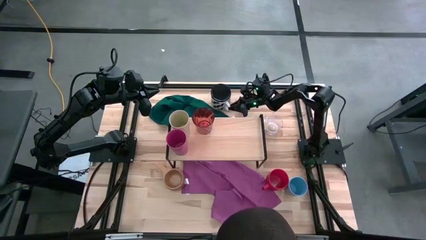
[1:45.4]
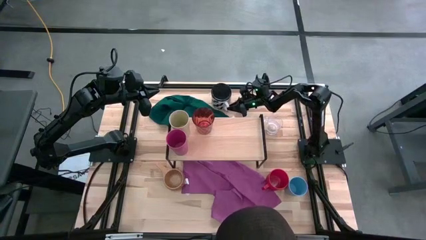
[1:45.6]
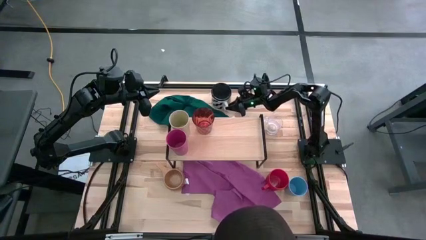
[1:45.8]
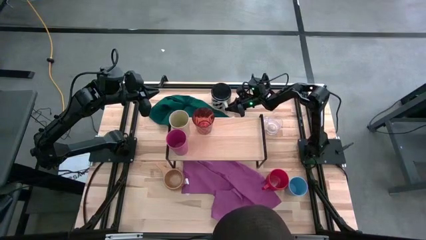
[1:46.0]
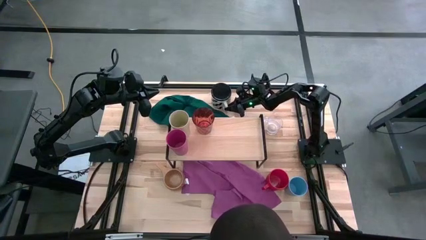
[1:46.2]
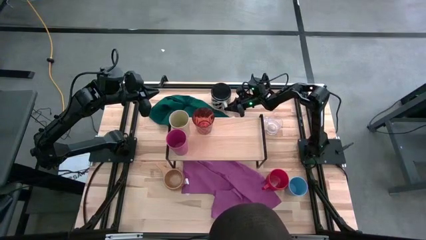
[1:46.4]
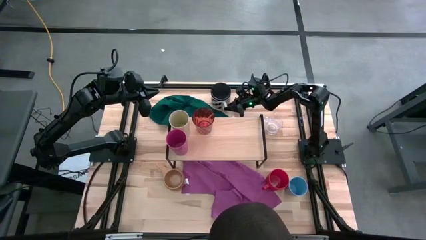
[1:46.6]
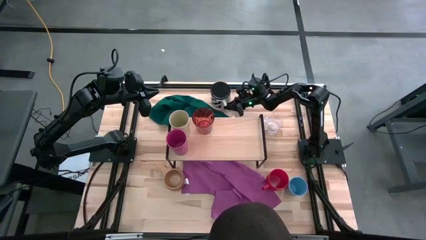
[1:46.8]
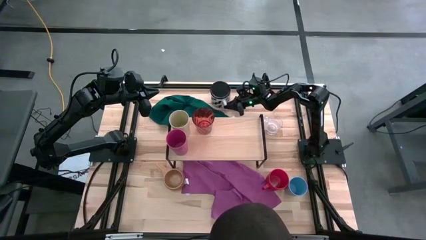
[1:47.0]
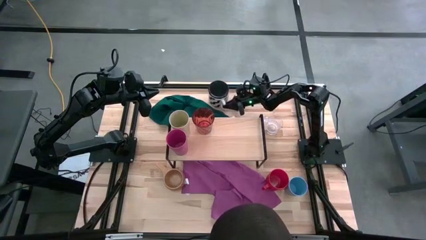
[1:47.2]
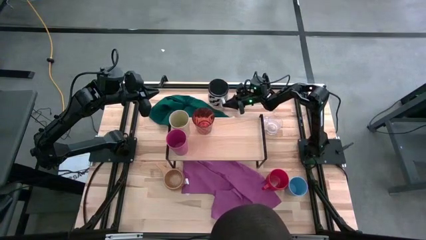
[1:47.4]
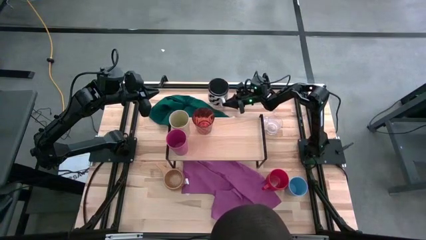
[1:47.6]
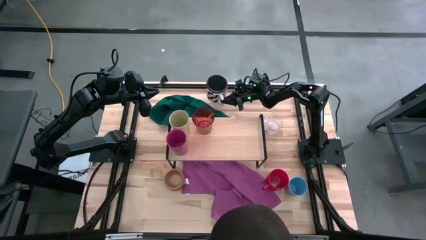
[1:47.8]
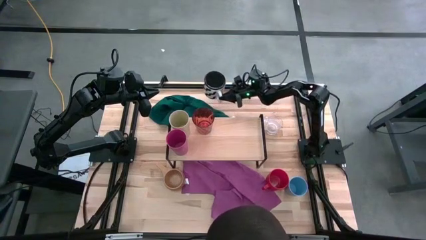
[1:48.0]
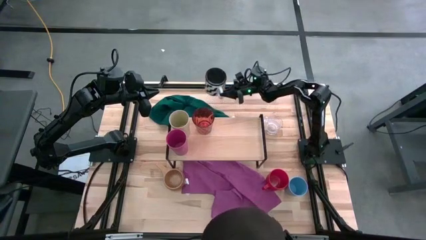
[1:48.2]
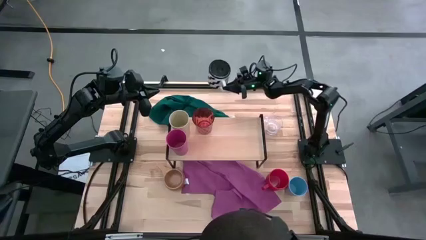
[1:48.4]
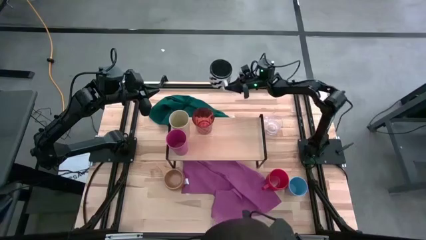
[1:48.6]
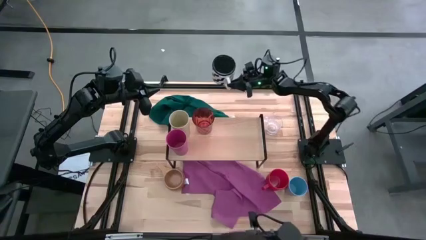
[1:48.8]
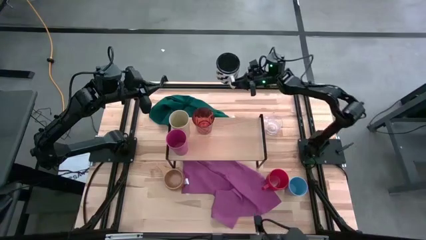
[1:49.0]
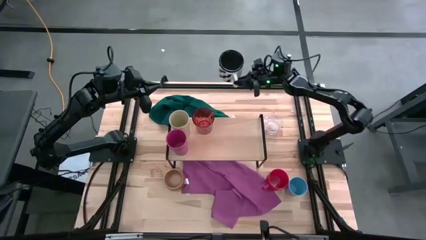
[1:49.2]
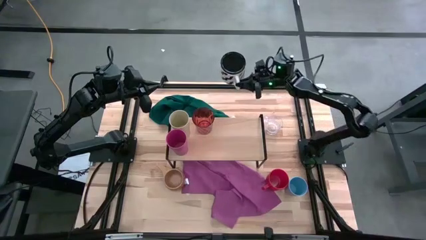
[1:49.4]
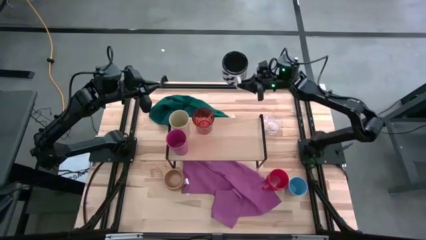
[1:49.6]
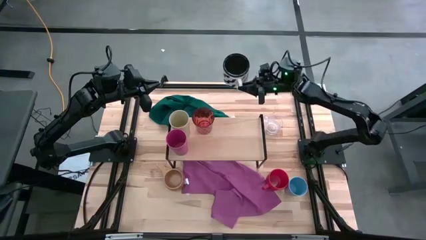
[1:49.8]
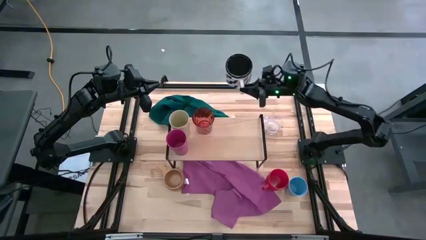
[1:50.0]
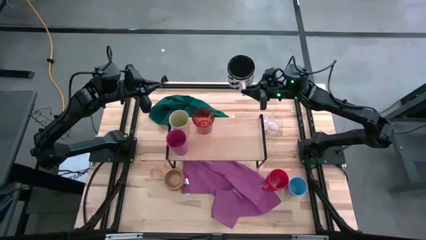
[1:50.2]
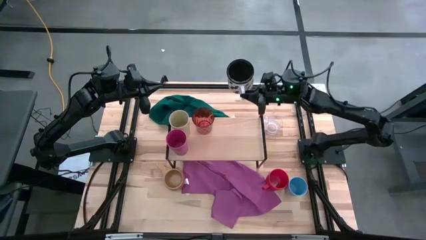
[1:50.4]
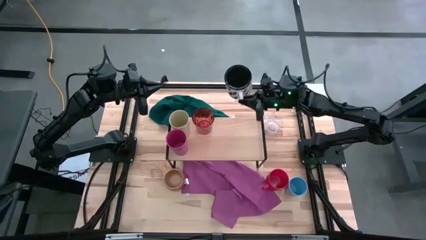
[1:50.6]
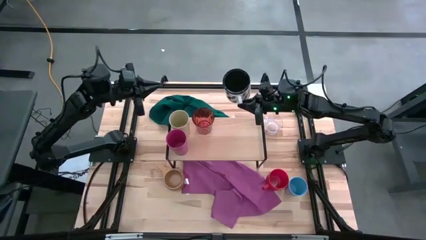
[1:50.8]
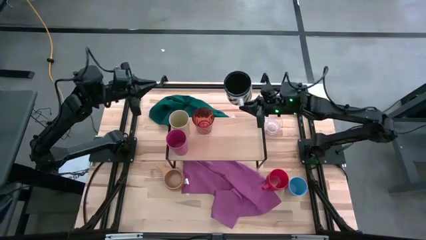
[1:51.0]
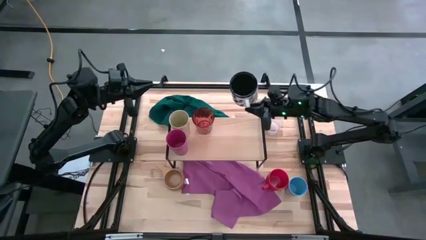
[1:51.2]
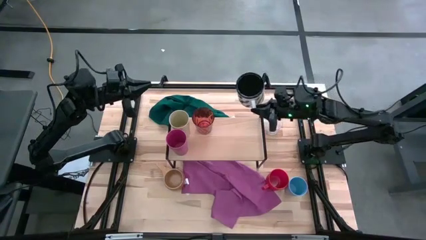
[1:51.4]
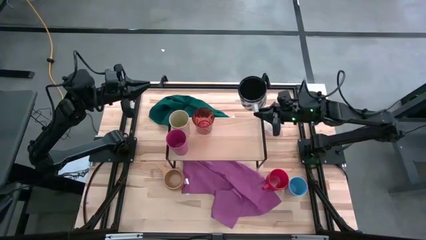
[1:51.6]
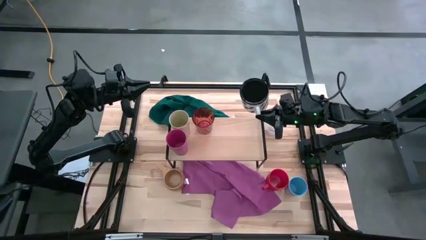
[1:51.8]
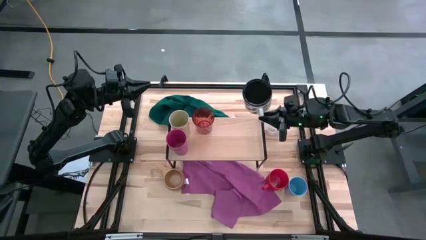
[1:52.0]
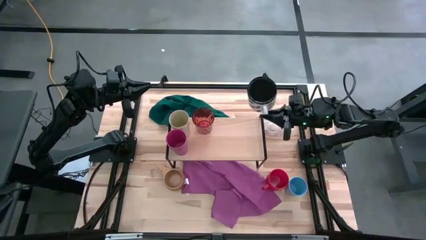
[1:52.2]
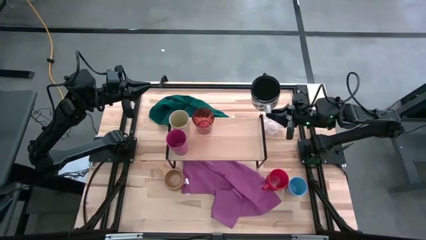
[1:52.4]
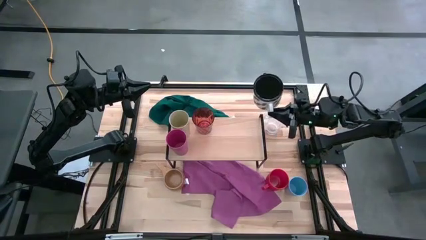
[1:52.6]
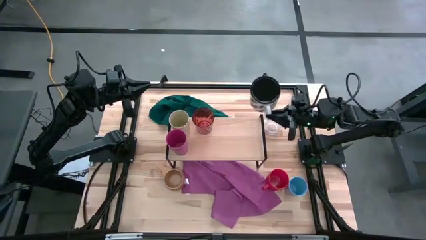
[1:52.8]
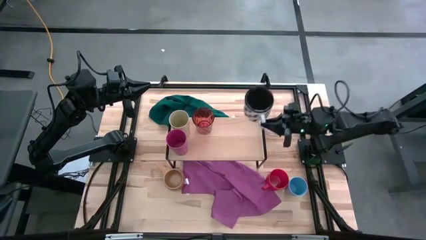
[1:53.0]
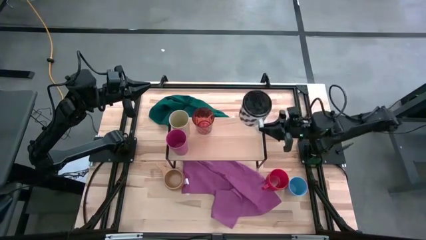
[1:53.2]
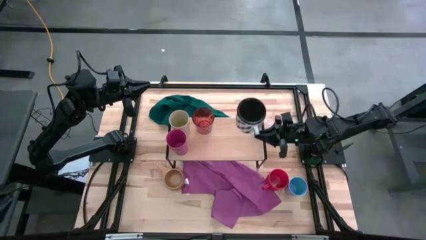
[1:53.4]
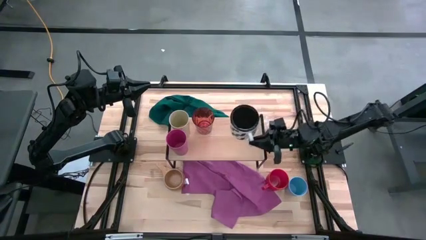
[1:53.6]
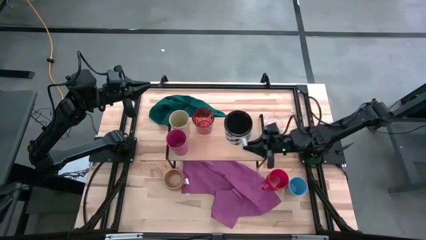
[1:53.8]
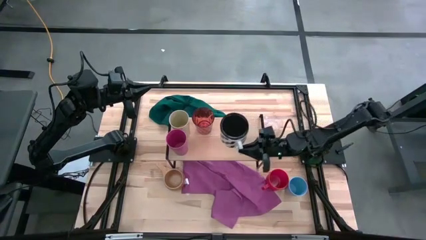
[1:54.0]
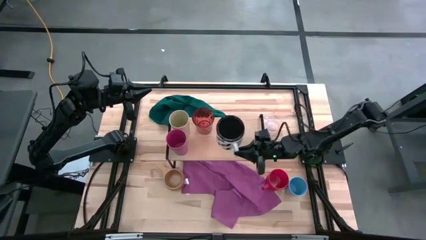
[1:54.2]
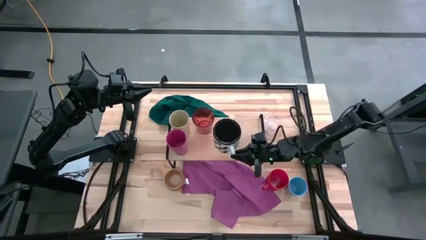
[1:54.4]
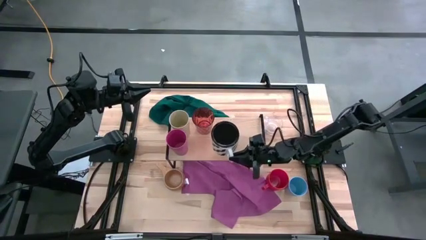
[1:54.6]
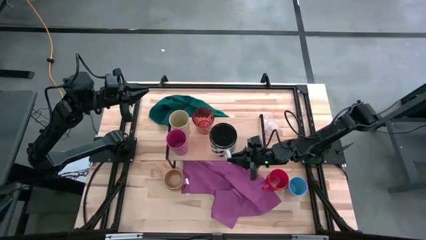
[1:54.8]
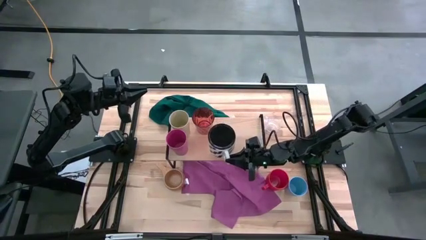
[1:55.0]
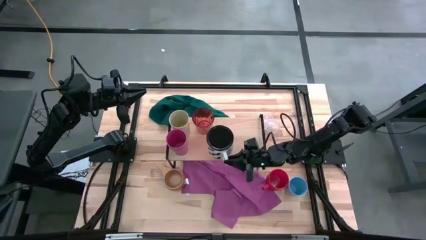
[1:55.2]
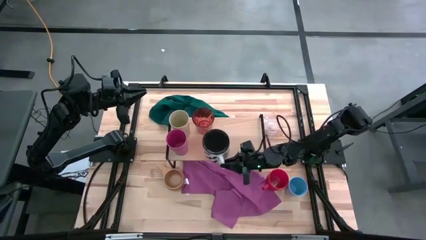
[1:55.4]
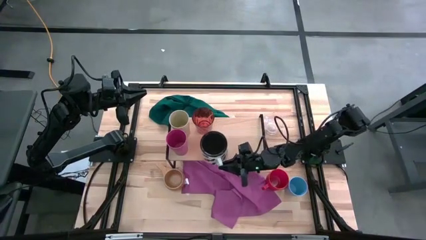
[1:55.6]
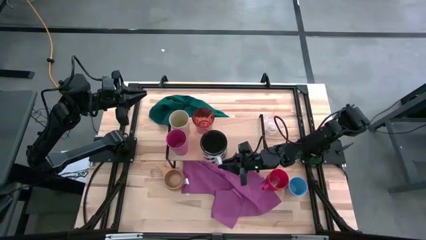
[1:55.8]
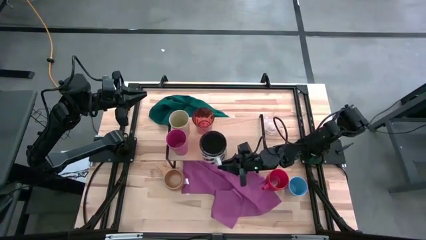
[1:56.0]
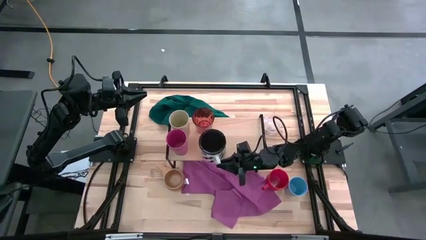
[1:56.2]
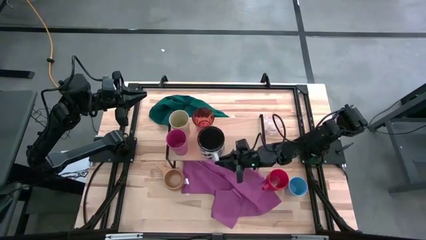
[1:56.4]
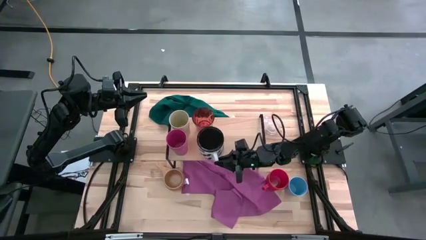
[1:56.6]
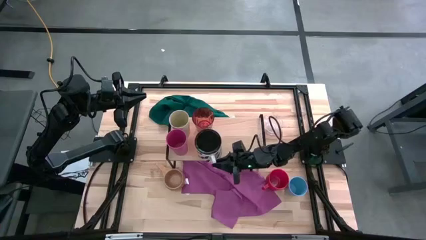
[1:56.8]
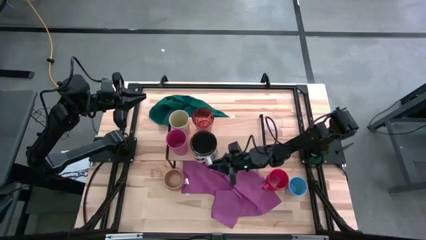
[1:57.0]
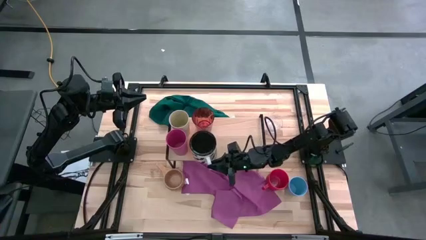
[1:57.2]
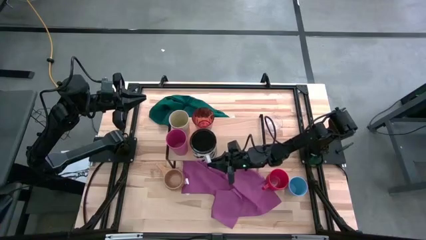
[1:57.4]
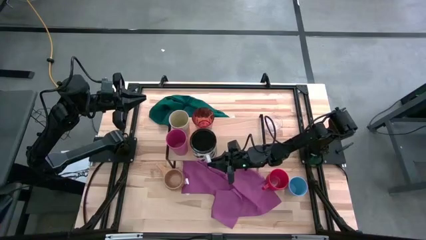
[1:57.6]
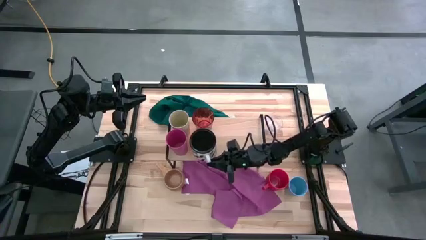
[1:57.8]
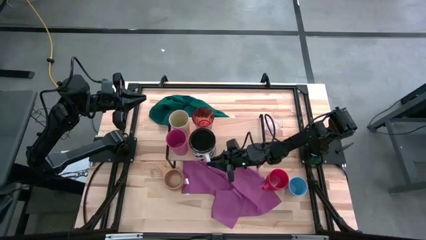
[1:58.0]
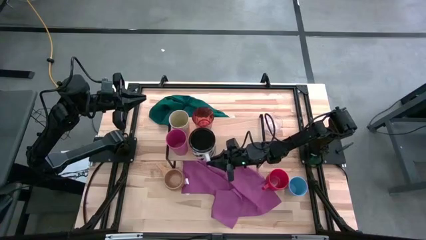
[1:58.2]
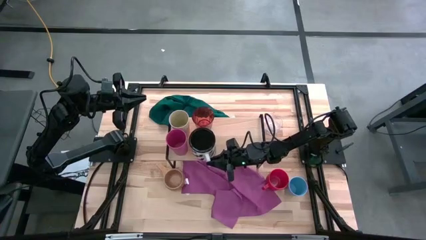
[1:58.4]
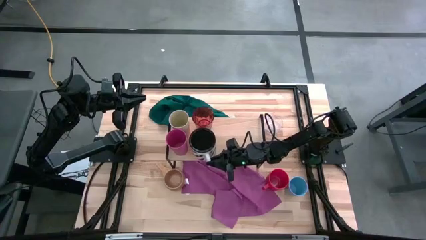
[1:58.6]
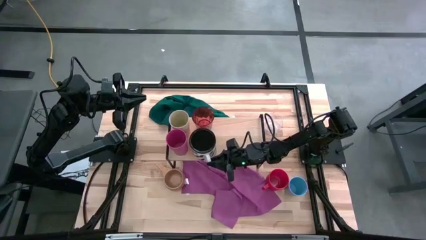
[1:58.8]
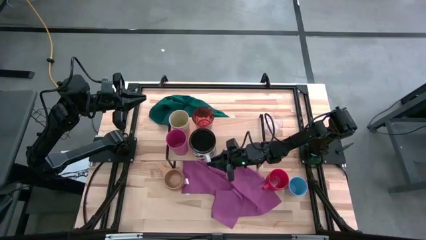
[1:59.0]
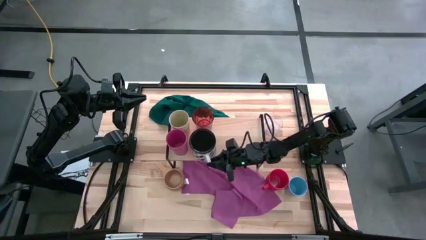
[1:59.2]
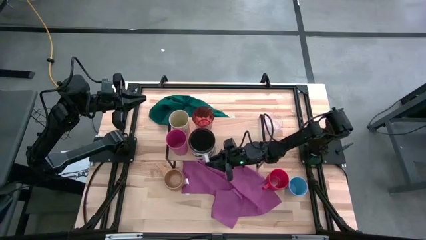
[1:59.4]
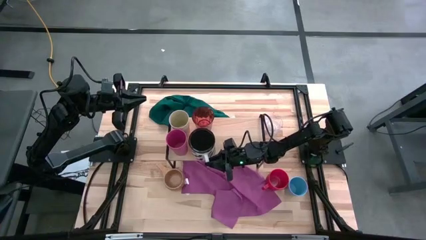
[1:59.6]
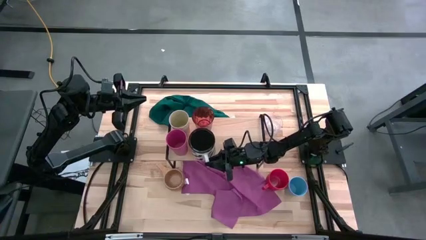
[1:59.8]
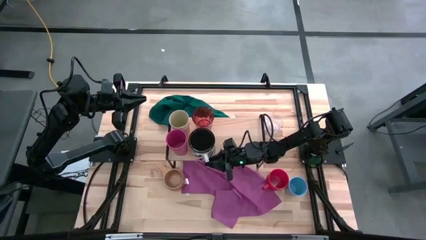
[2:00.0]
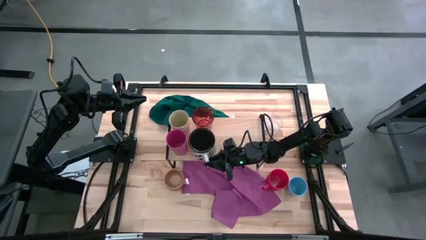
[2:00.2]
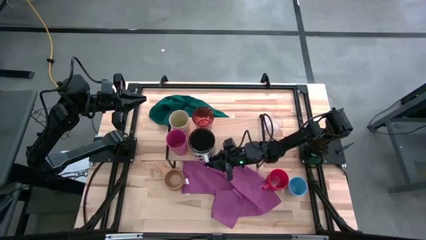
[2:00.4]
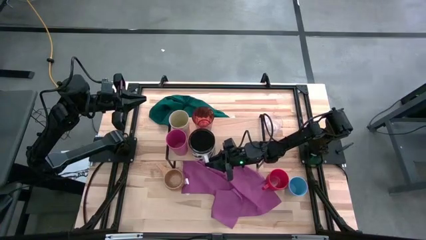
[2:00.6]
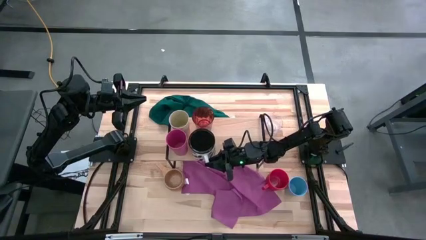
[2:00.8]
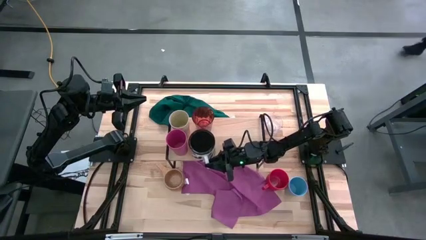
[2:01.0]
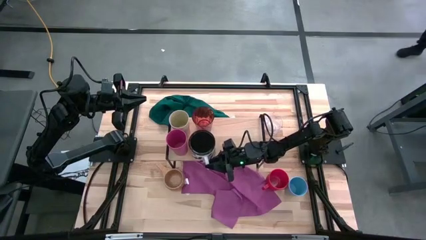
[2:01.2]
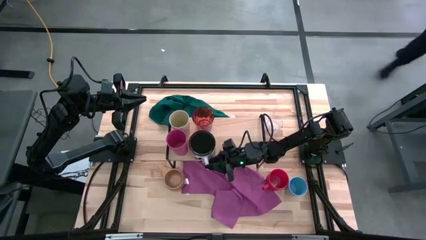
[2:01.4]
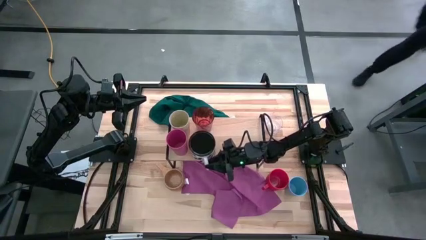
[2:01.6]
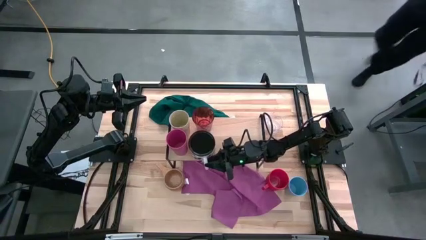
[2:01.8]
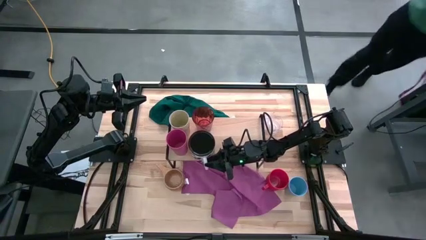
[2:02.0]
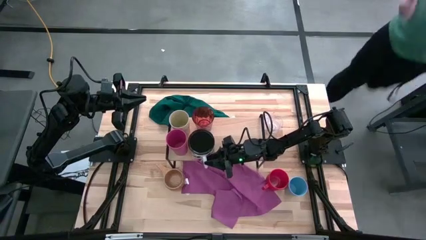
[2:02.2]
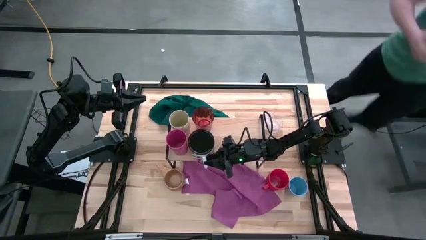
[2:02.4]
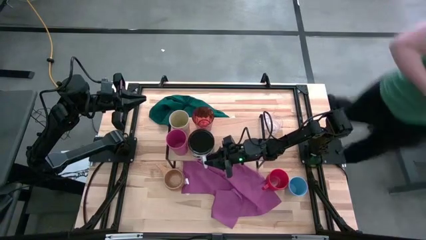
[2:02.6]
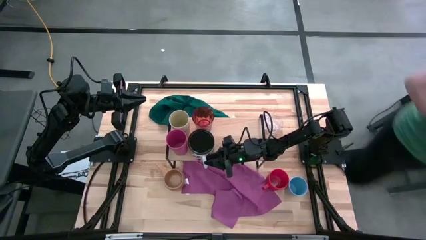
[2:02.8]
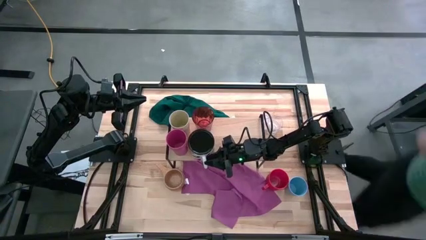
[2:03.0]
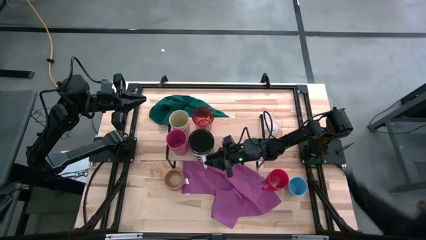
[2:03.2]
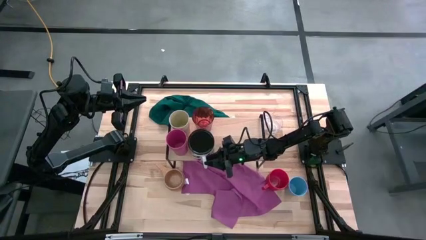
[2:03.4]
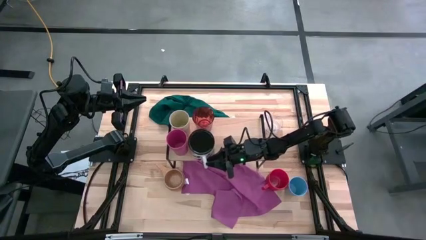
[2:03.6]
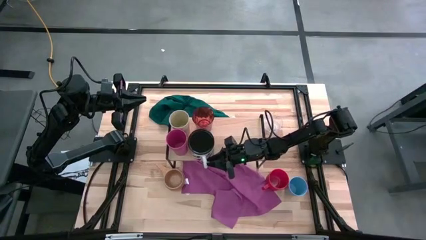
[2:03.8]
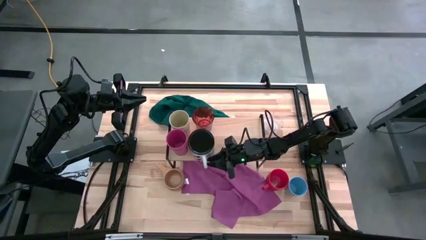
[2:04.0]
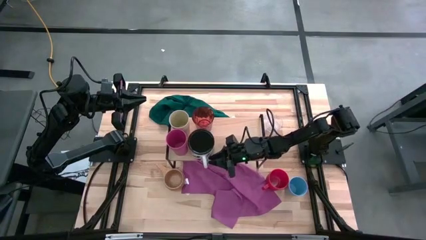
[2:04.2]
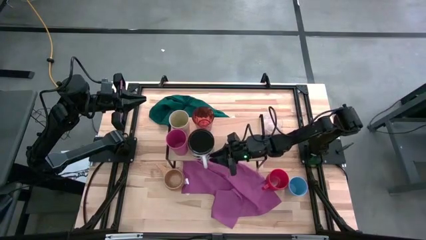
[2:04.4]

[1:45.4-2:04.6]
Task: Stack small to large cups/mugs on shelf
Put the white mug on the shelf
